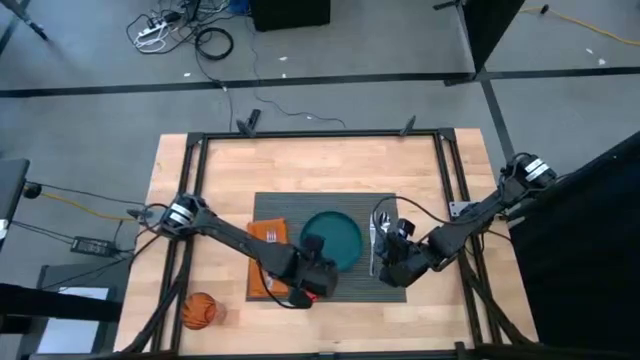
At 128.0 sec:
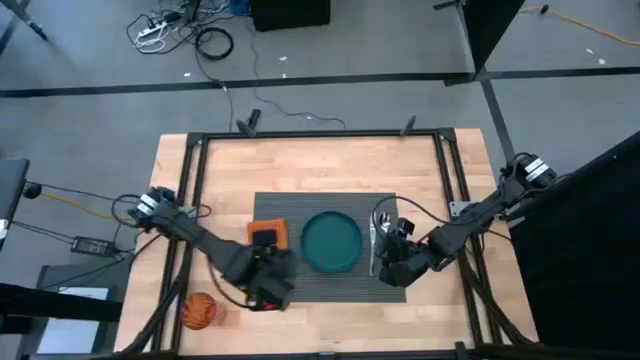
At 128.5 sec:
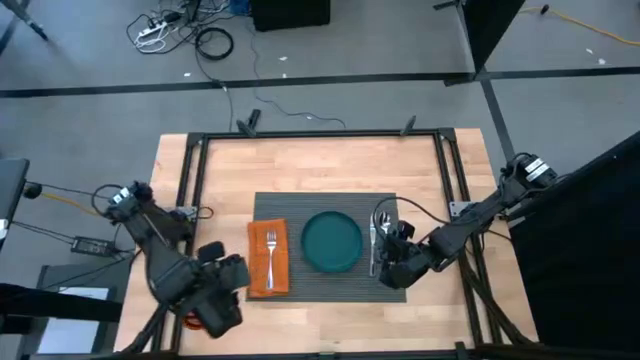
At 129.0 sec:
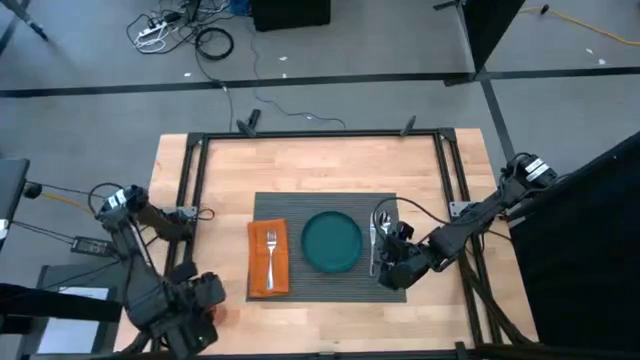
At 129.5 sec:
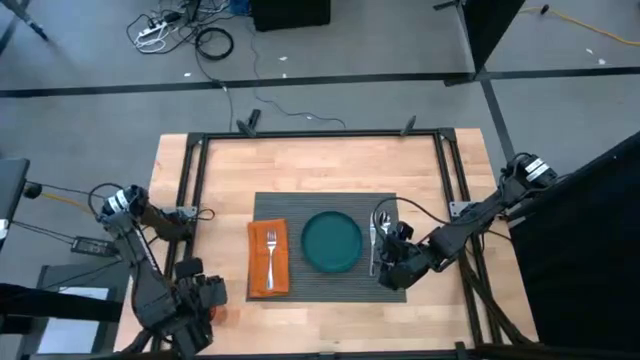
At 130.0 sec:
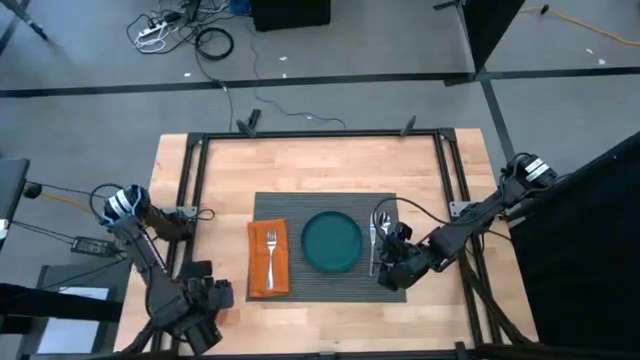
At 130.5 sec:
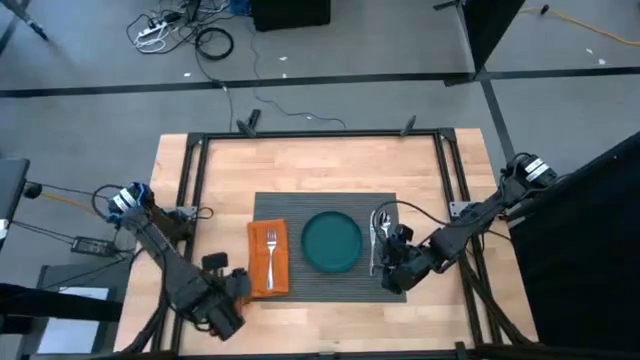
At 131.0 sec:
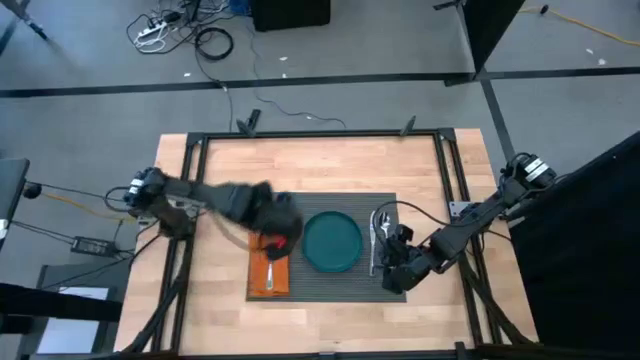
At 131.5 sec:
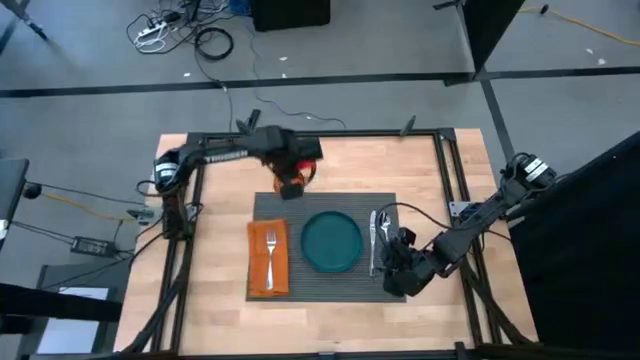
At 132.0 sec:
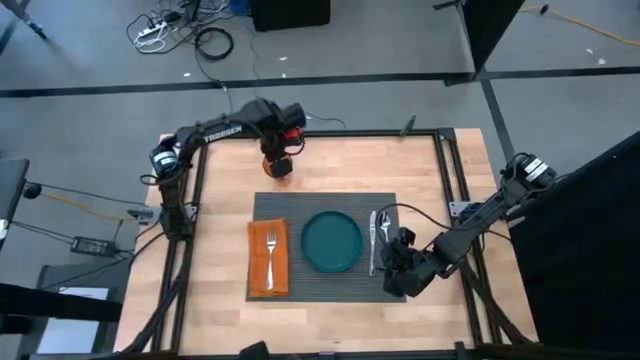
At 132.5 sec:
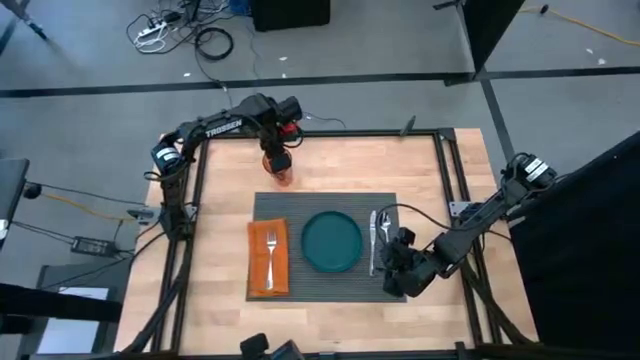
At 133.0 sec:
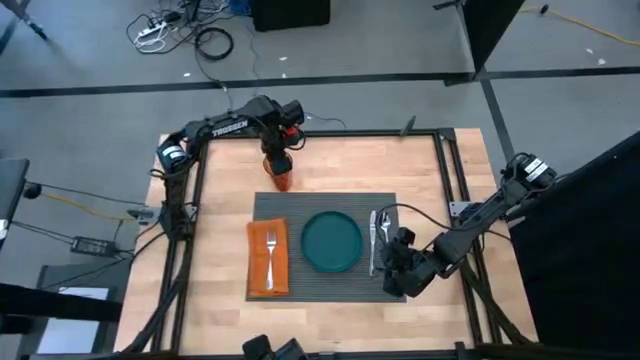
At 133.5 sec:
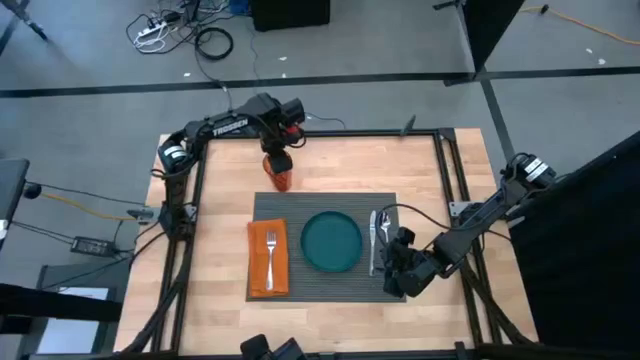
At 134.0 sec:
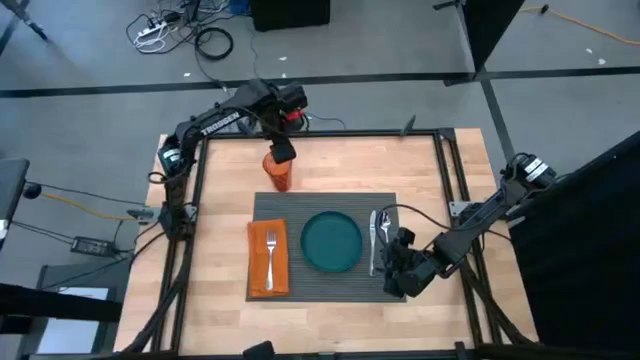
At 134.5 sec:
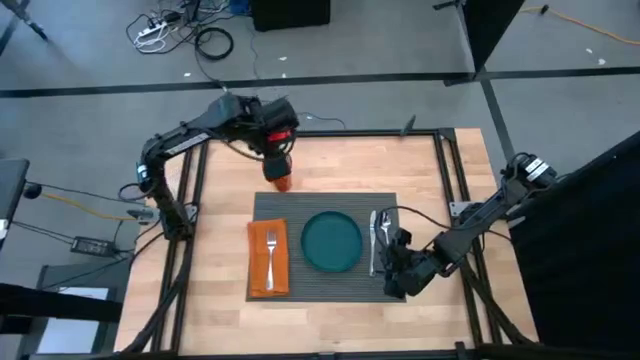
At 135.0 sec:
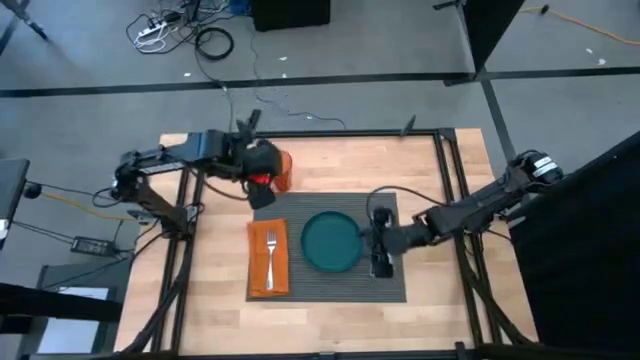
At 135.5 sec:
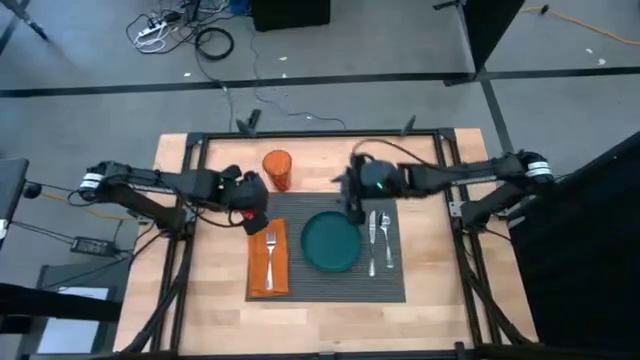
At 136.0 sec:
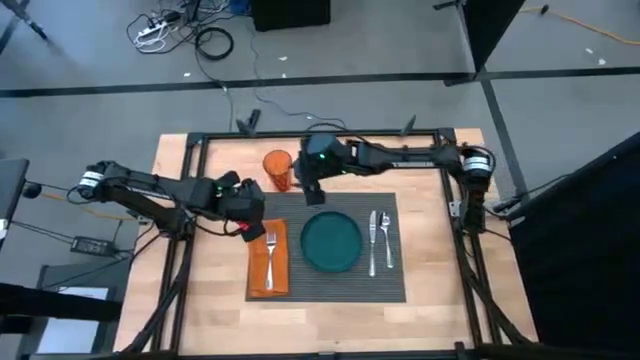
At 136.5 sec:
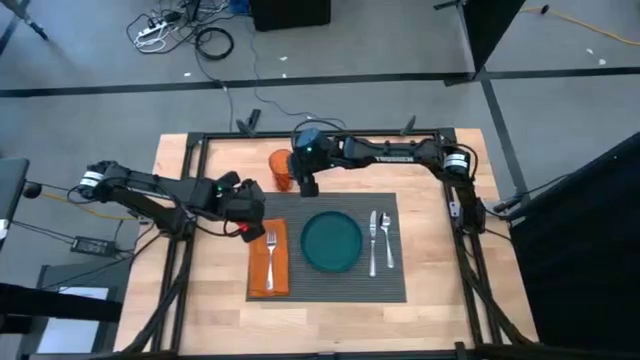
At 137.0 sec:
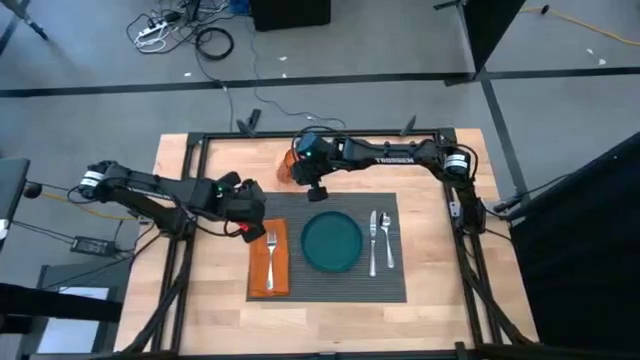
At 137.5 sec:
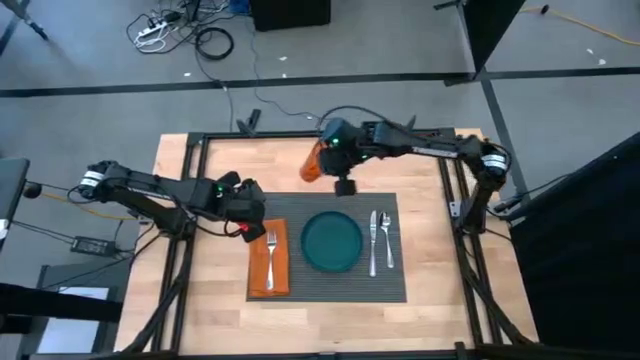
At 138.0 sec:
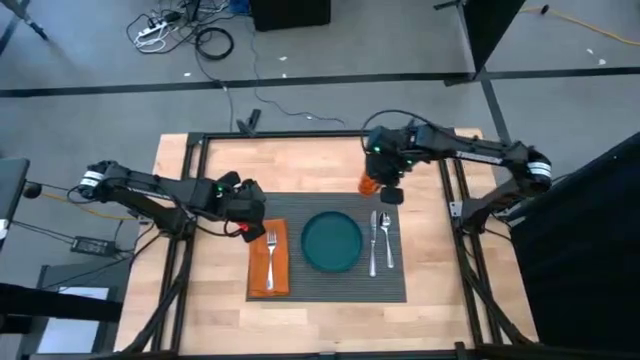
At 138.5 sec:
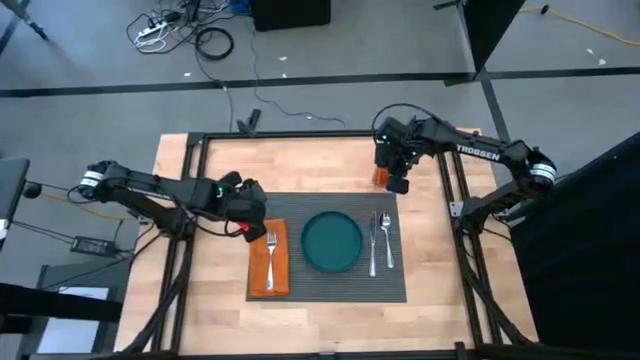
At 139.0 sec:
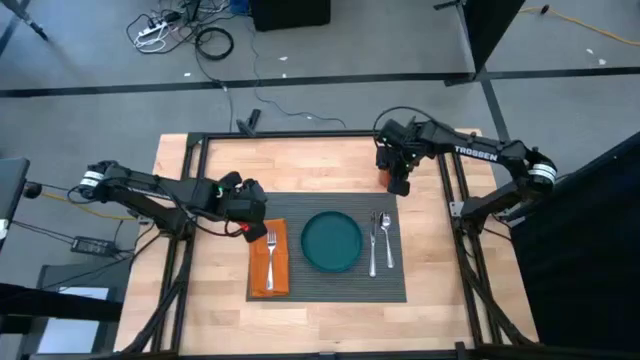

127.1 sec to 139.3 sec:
Task: Set table place
Move the orange cup on the top right of the gray placemat

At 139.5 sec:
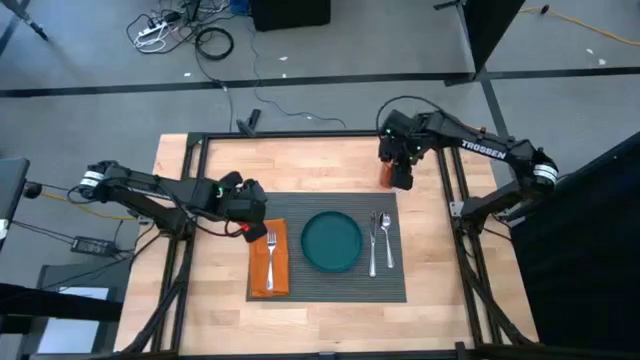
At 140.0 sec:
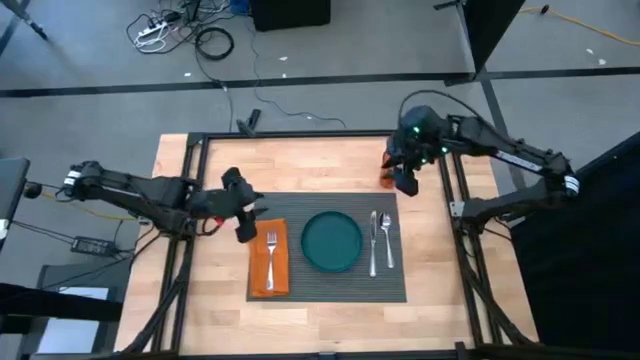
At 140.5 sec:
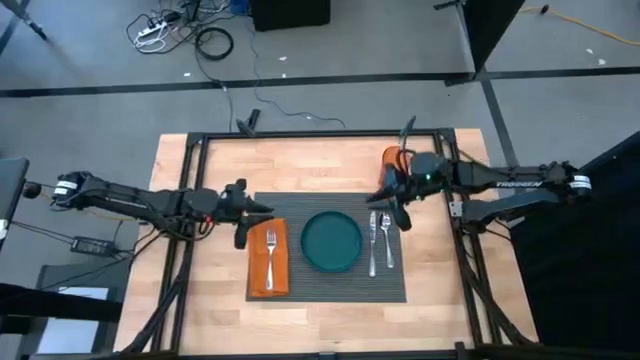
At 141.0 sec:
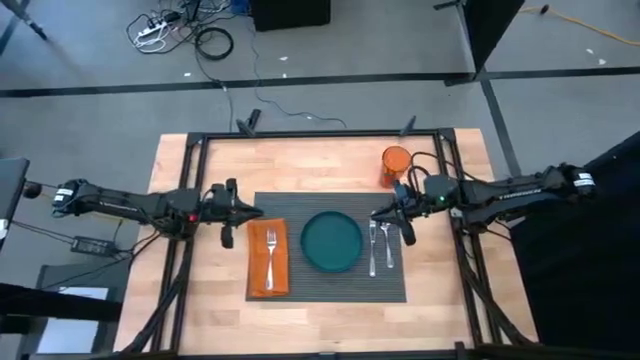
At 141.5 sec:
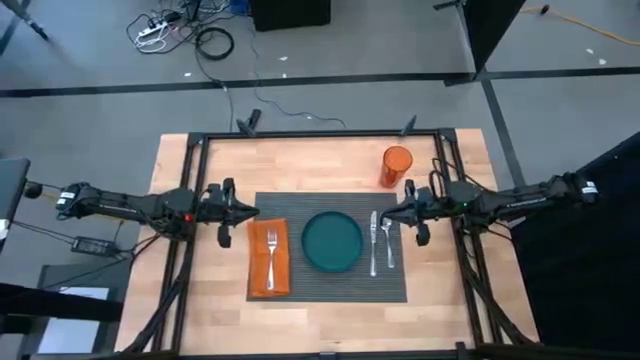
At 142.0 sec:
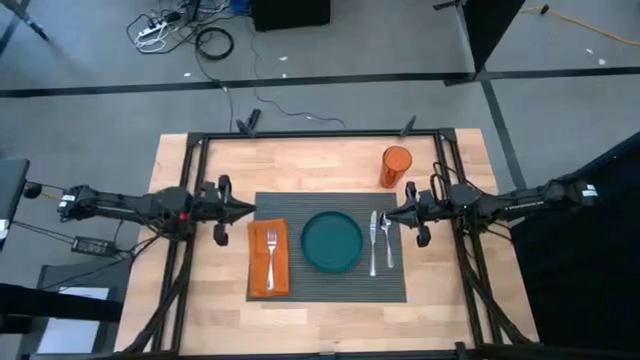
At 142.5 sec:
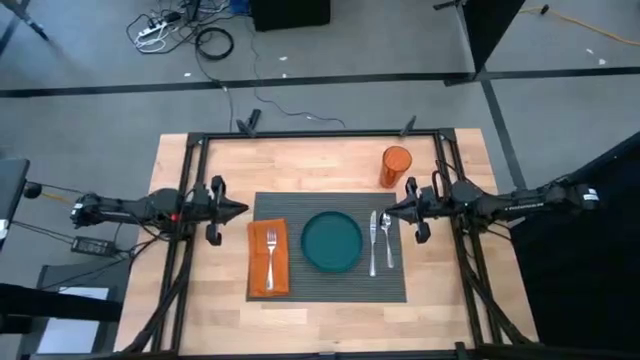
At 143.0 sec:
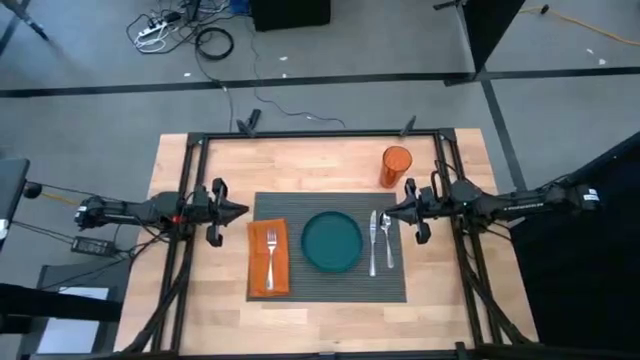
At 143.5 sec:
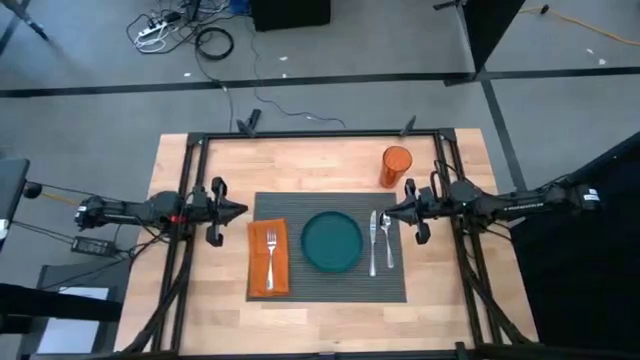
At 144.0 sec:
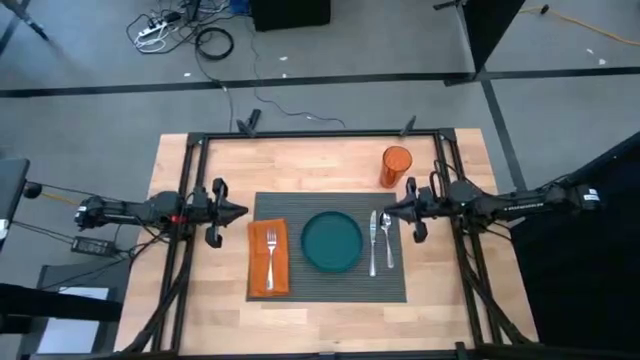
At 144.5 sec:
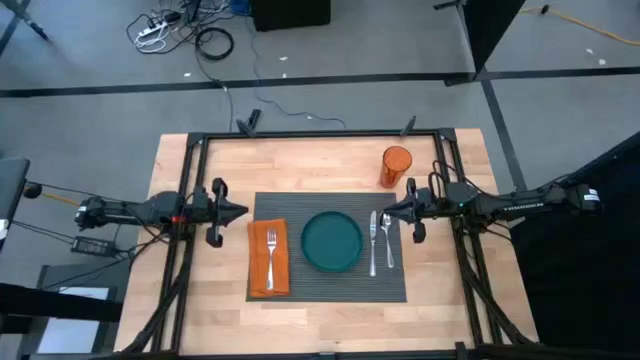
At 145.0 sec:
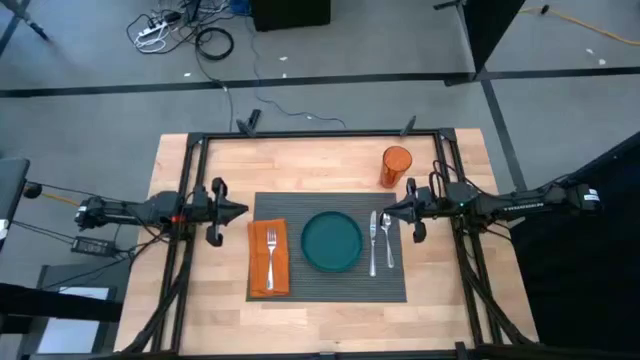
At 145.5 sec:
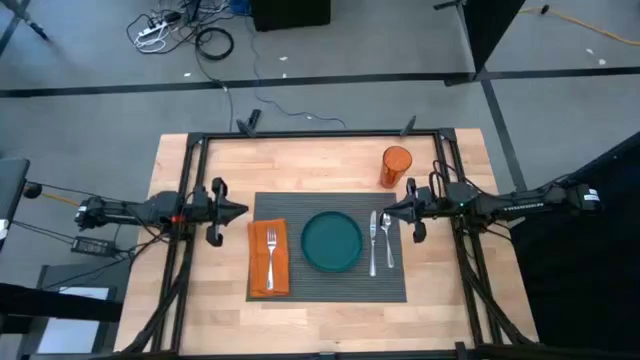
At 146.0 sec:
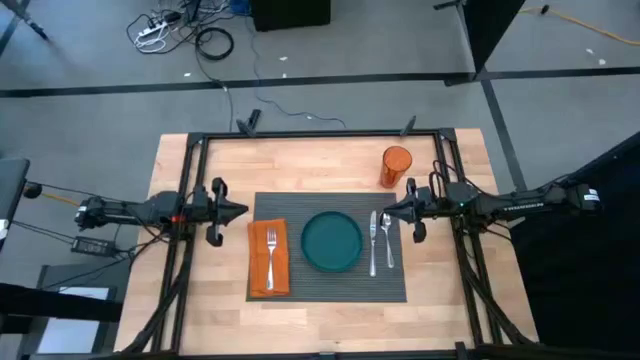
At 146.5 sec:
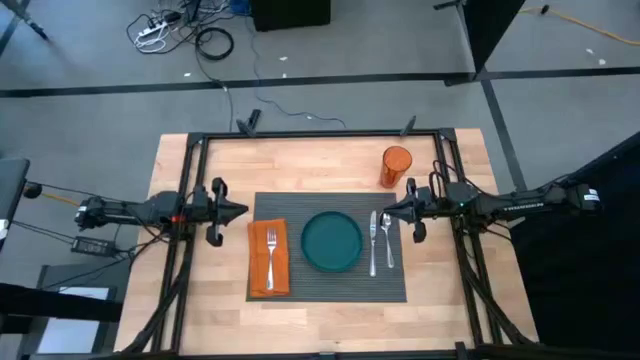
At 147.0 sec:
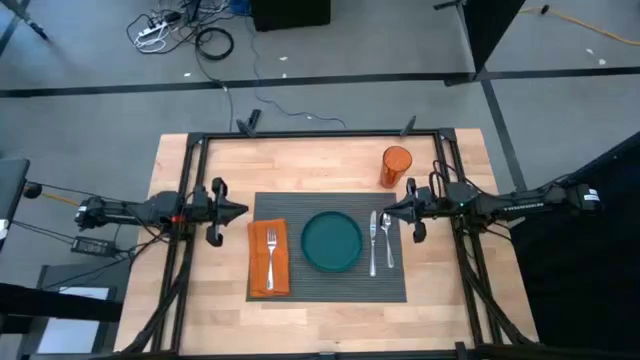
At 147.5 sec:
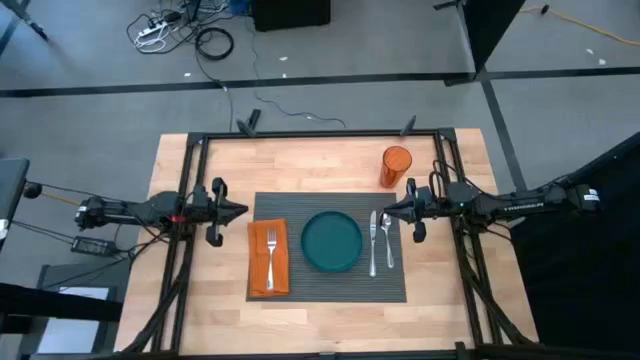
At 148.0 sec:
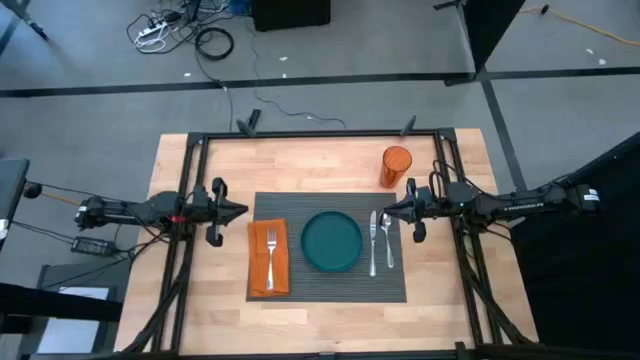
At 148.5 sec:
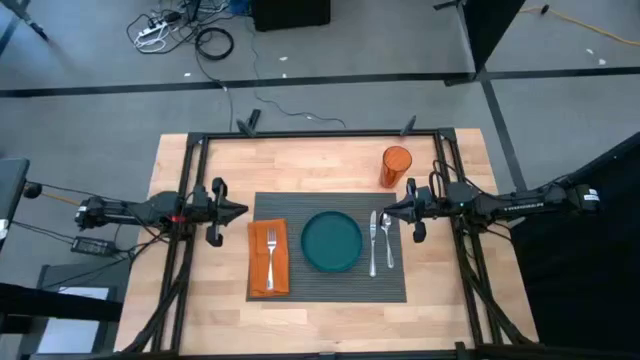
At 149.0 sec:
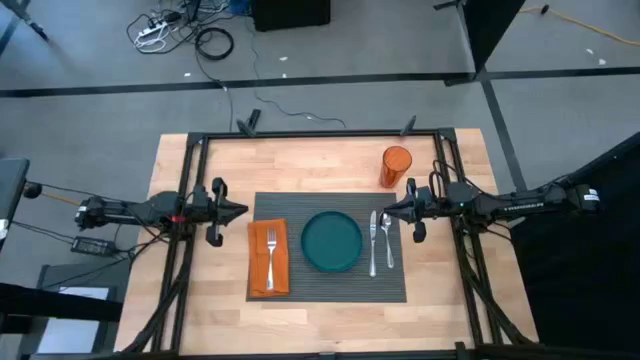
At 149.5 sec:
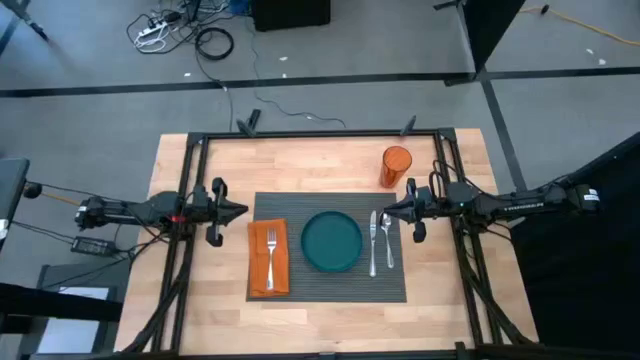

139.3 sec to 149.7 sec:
Return to Home Position
